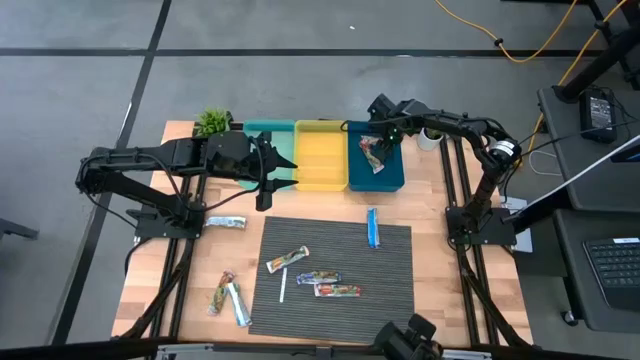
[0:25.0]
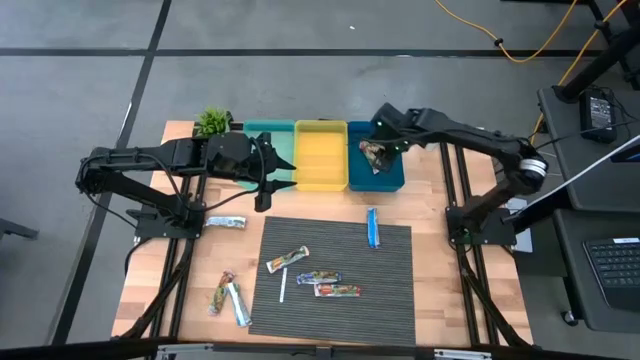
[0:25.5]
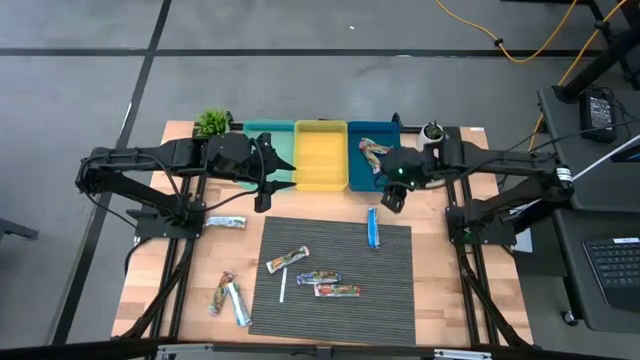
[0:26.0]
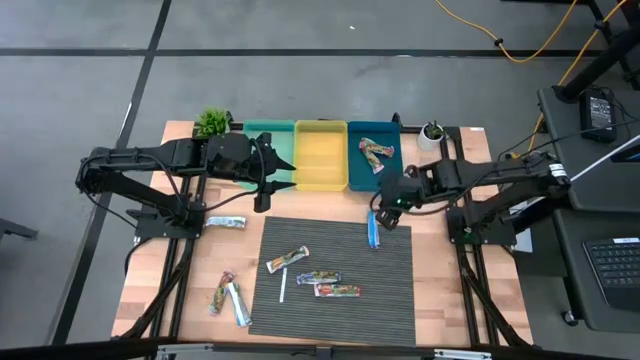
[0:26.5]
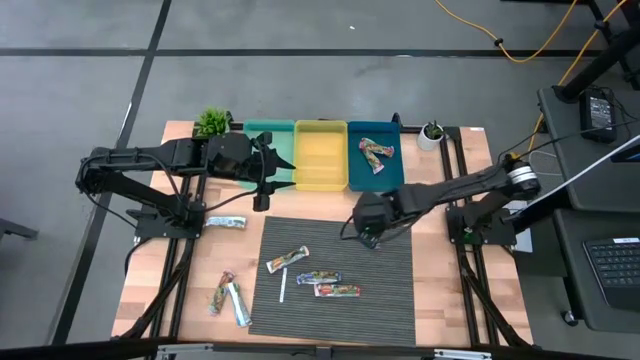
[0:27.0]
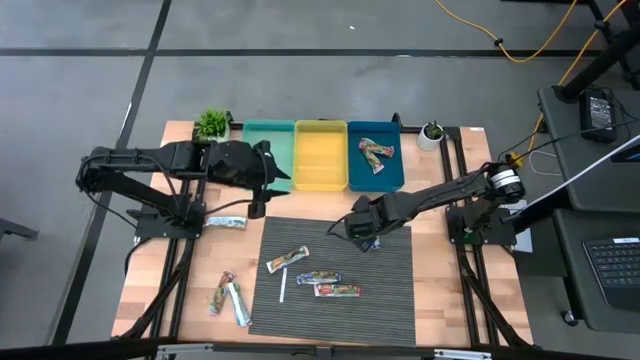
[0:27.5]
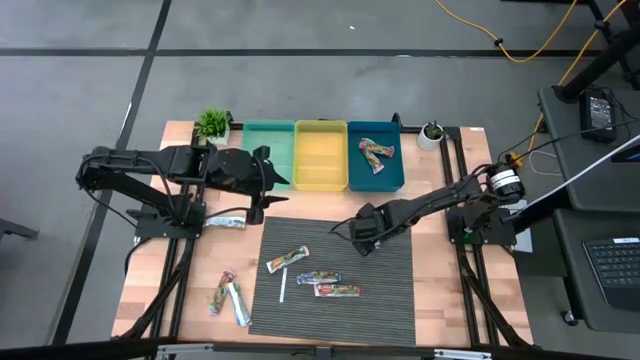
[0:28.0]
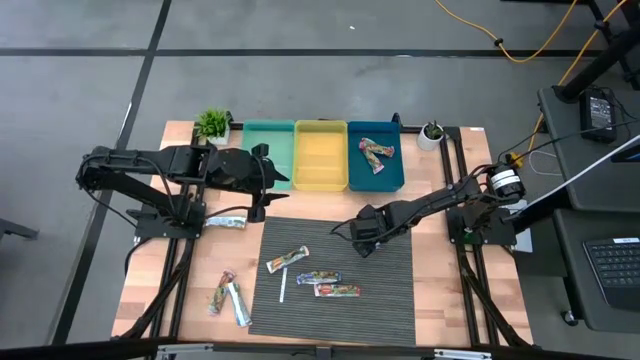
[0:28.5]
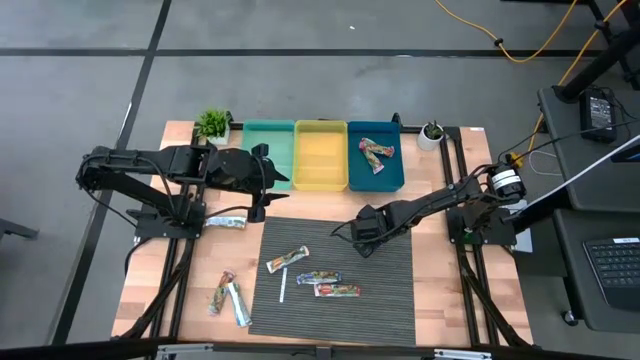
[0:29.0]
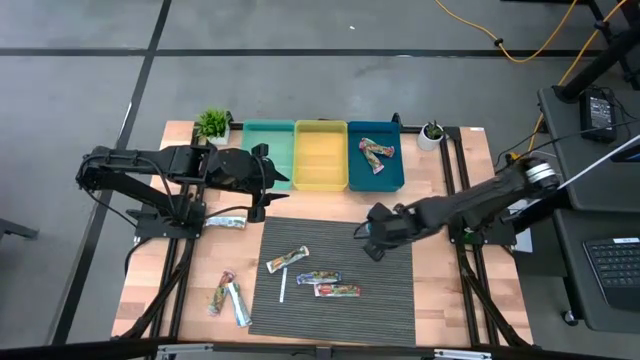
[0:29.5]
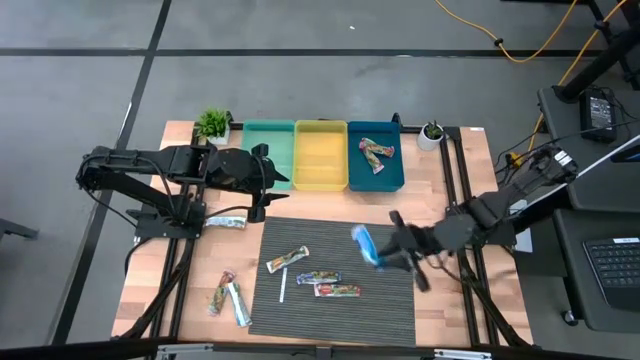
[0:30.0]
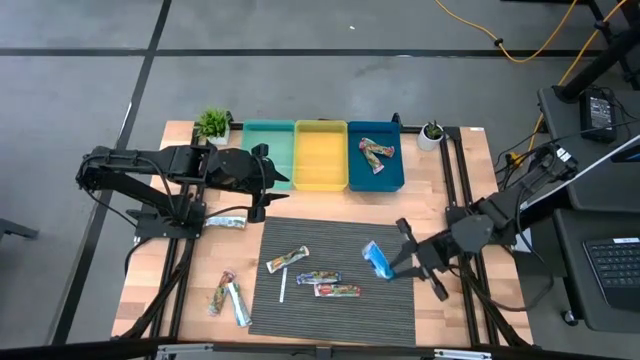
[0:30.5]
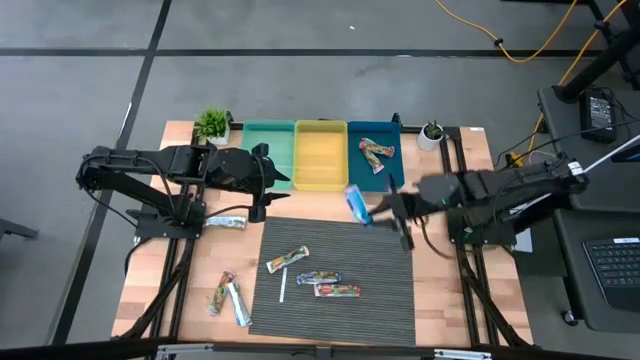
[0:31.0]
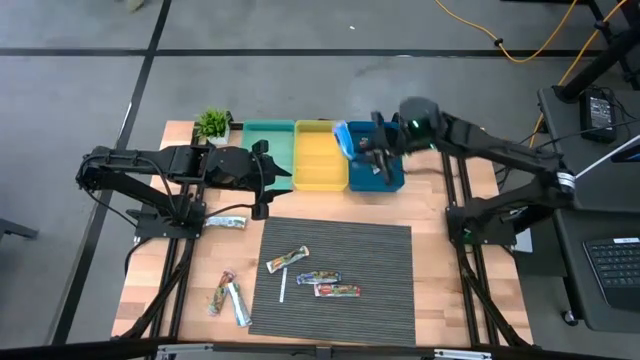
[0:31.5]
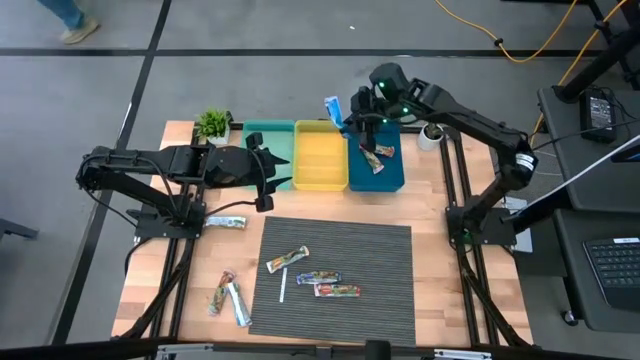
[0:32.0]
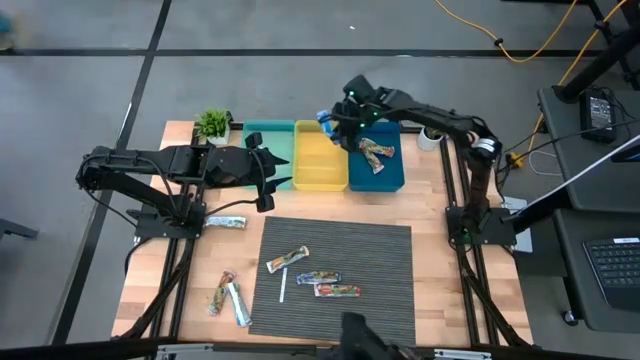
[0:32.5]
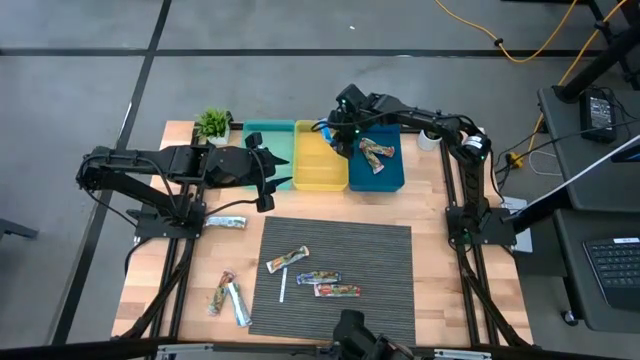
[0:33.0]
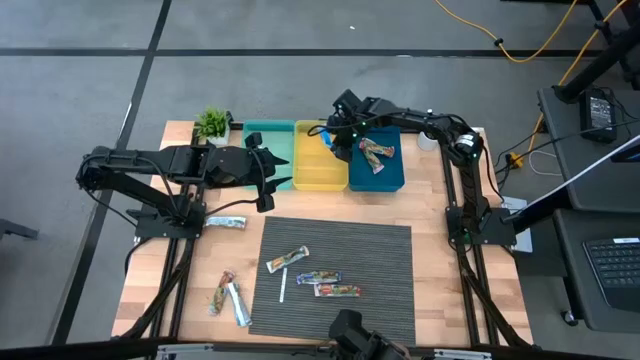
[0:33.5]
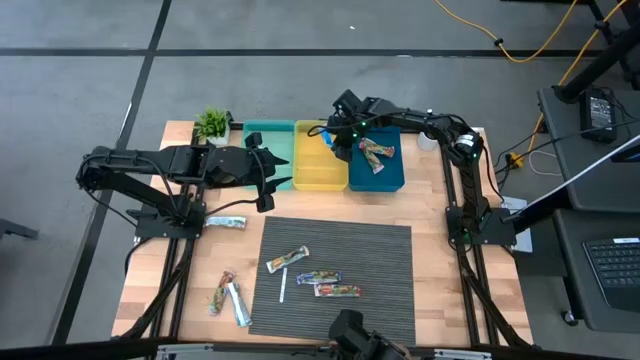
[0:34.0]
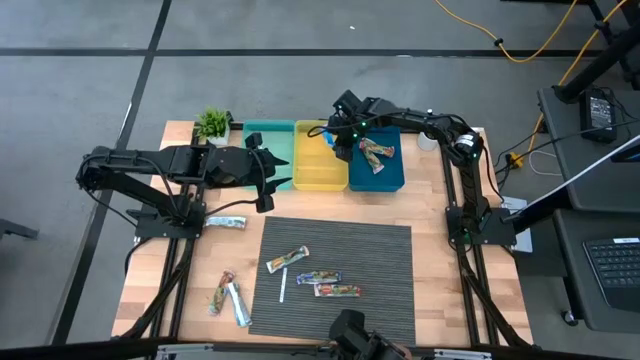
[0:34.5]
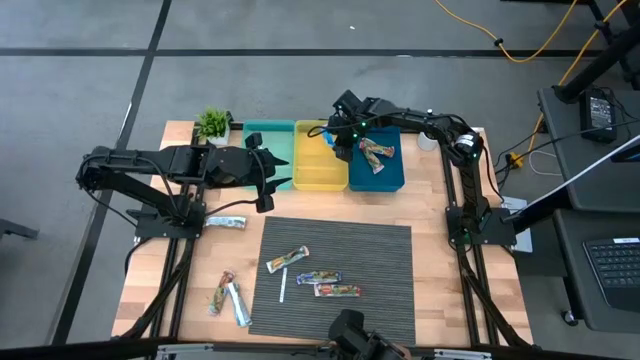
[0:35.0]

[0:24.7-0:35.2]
Task: Pick and place Granola Bars by type
Put the blue granola bar into the yellow bin

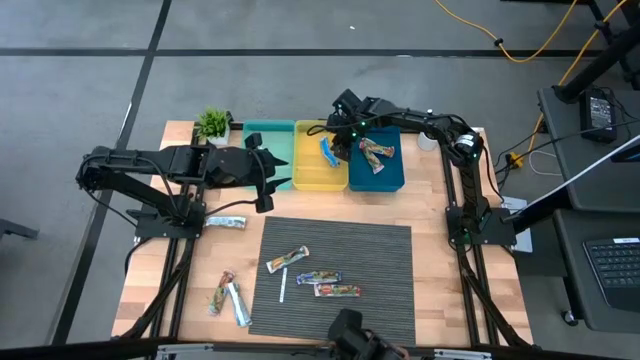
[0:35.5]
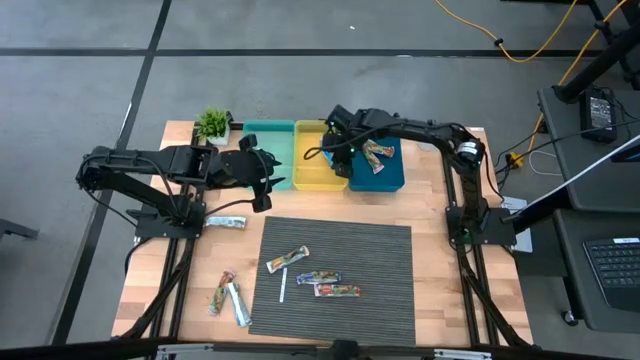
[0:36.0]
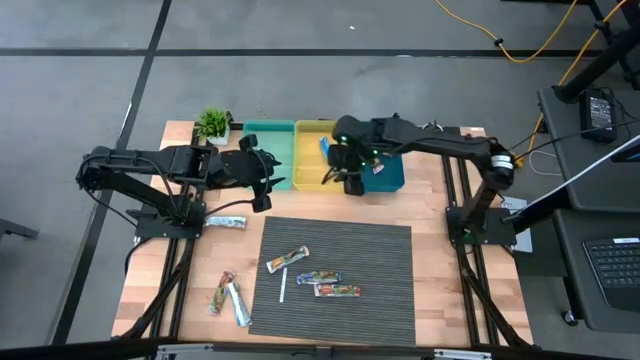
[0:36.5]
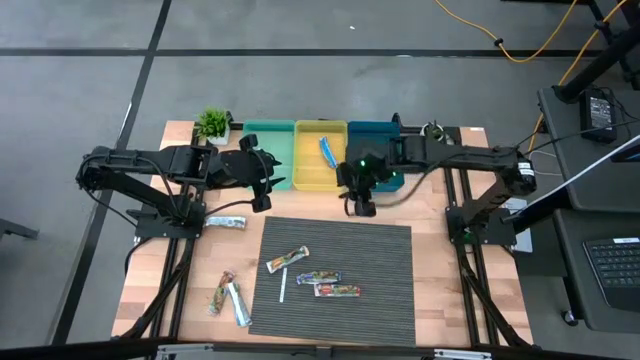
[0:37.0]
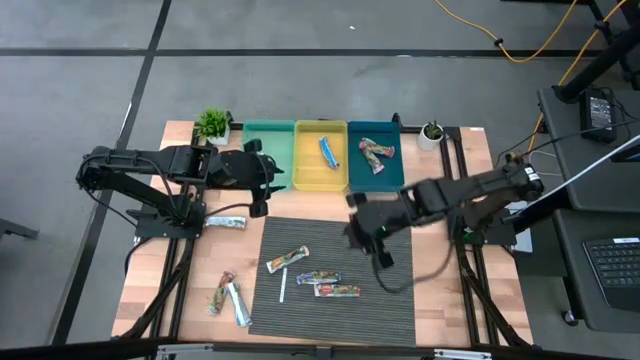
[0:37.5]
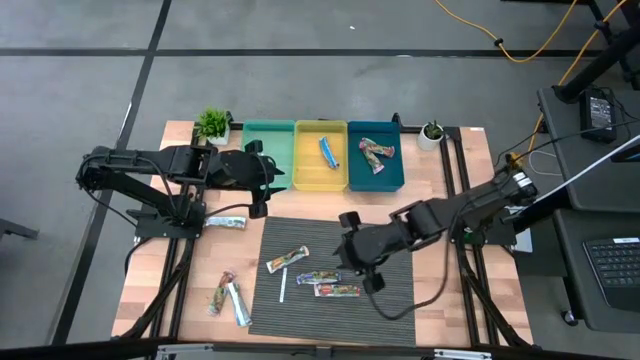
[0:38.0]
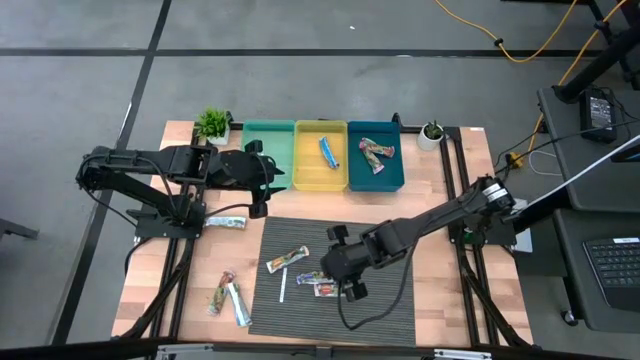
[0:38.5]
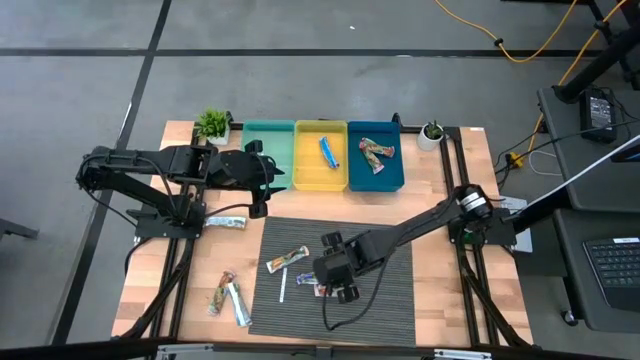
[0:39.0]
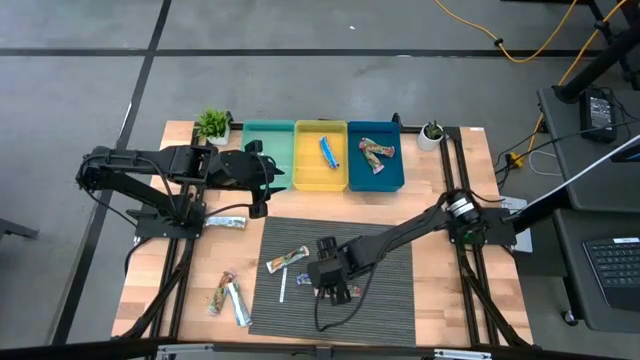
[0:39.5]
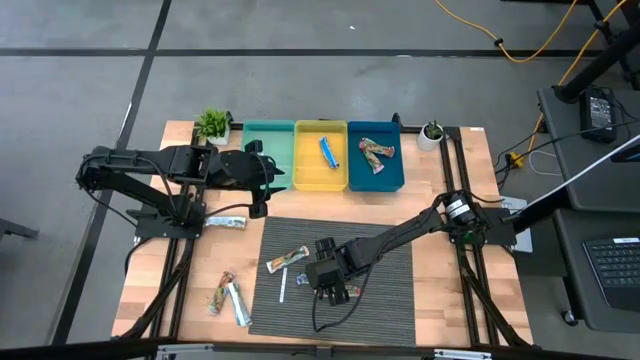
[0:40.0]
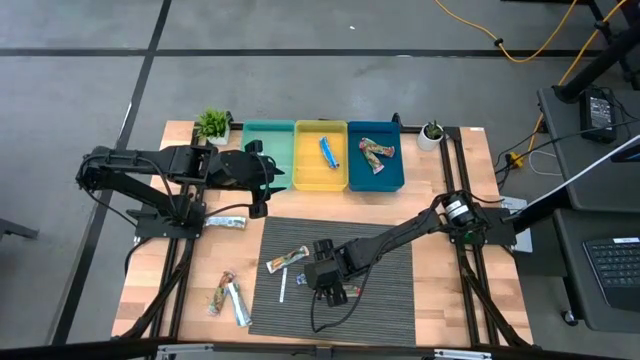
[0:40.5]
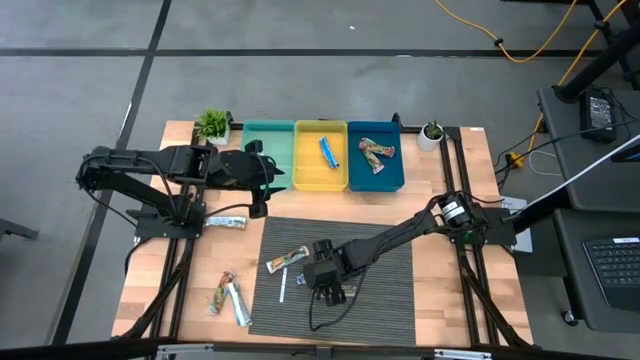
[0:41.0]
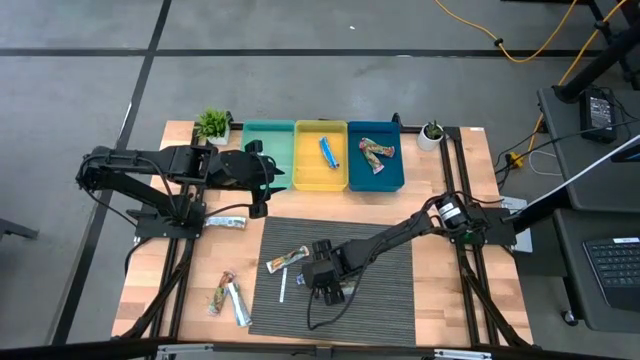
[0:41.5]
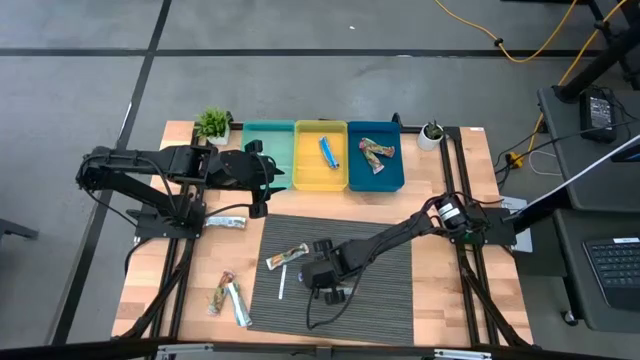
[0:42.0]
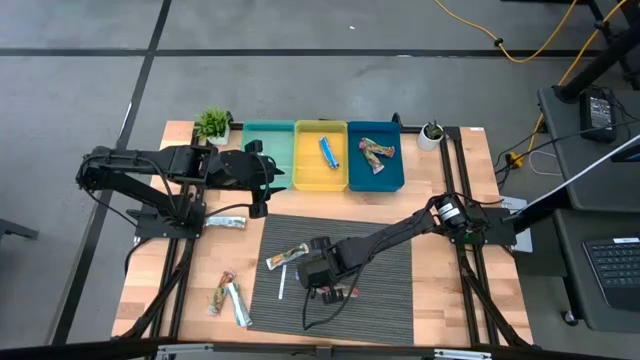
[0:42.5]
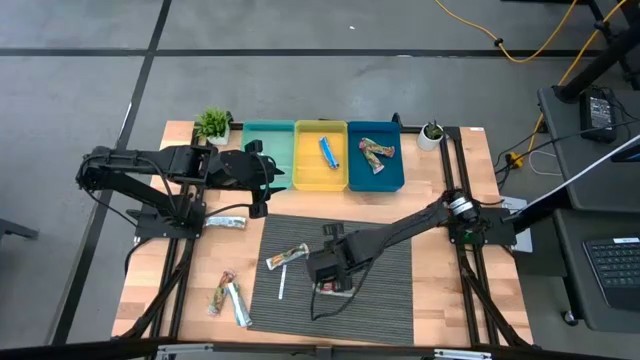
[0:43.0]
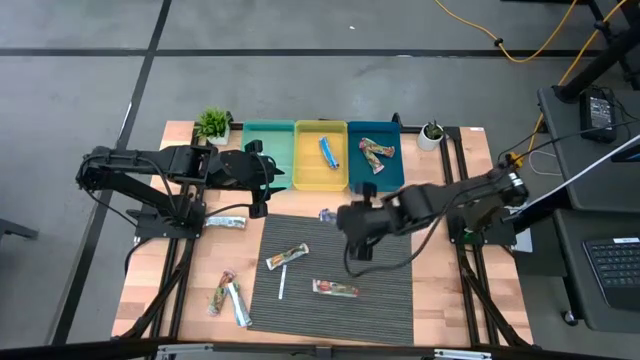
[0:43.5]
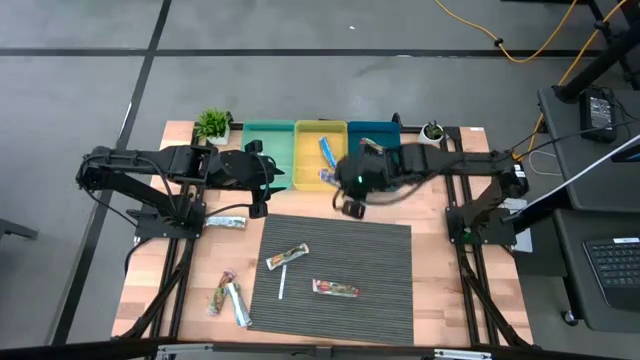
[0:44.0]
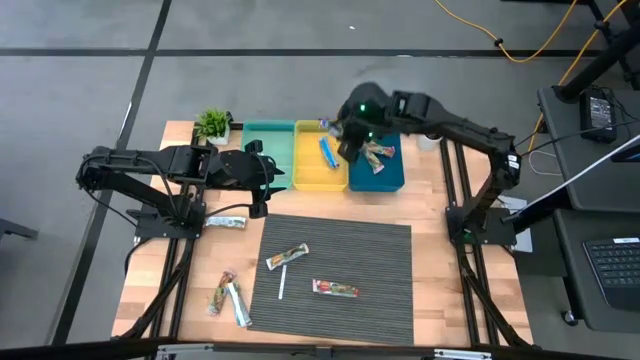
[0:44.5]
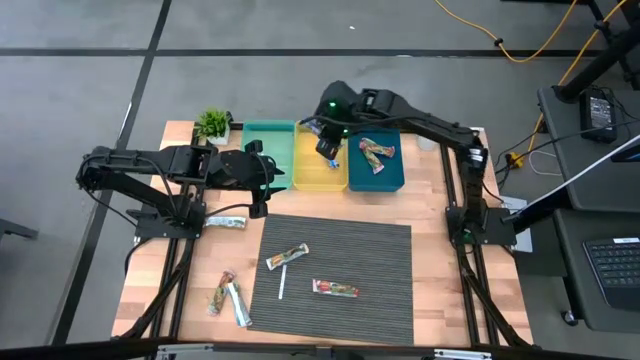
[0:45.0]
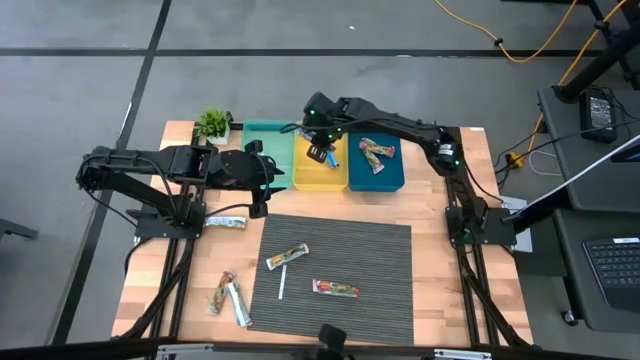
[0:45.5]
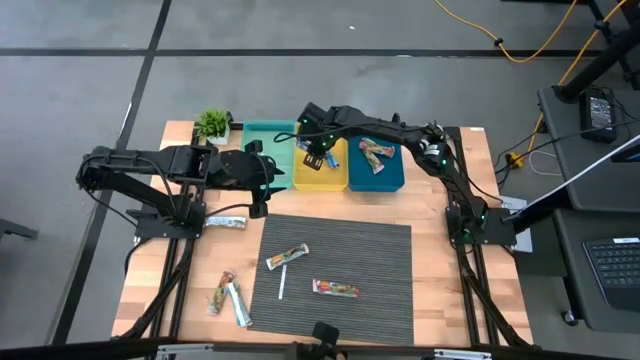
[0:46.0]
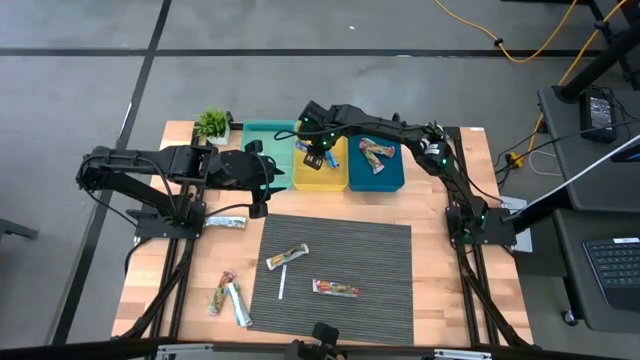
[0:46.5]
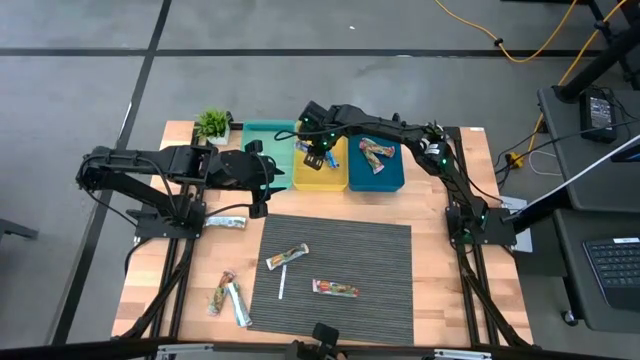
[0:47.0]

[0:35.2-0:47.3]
Put the blue granola bar into the yellow bin
